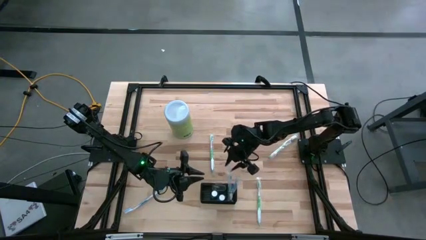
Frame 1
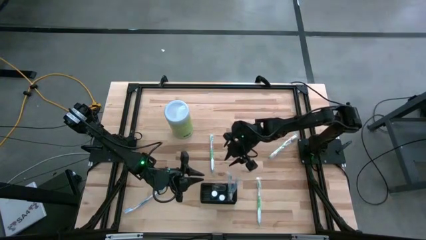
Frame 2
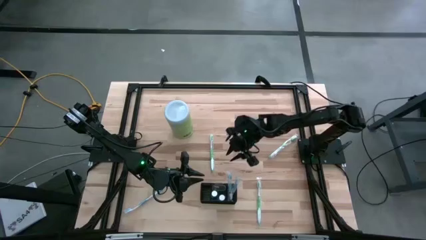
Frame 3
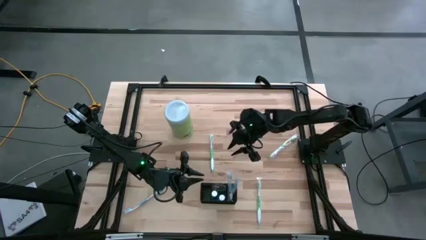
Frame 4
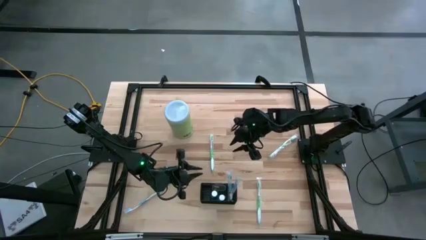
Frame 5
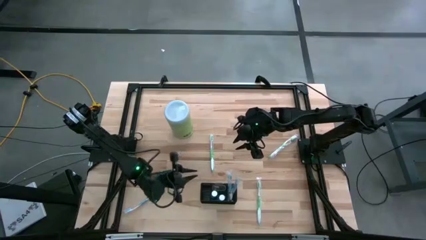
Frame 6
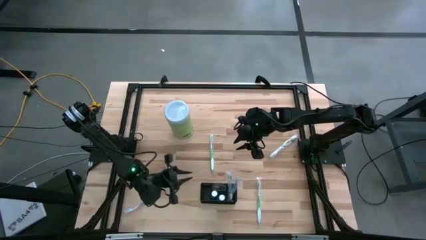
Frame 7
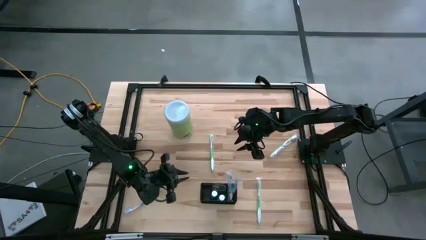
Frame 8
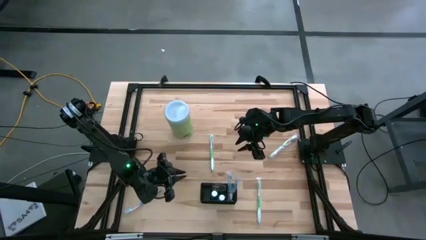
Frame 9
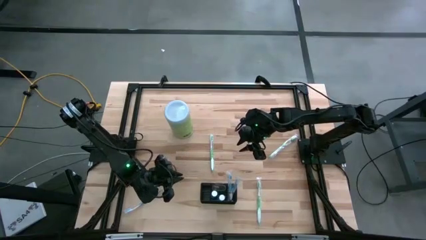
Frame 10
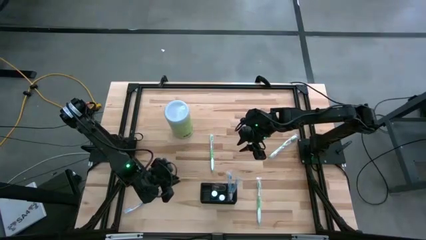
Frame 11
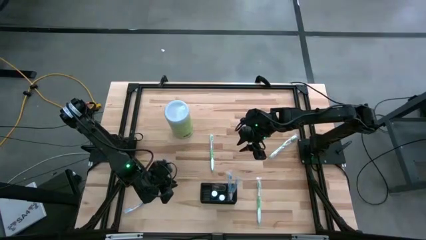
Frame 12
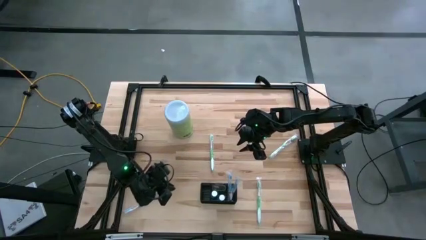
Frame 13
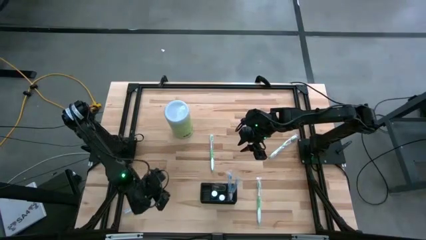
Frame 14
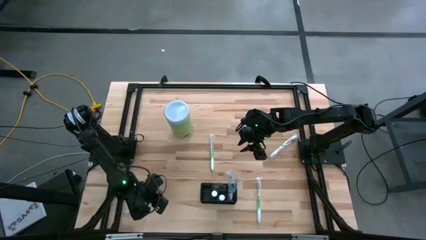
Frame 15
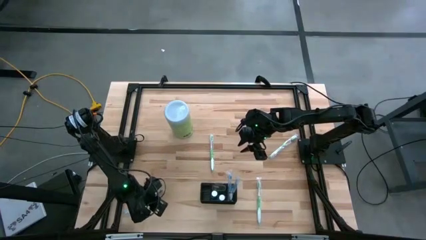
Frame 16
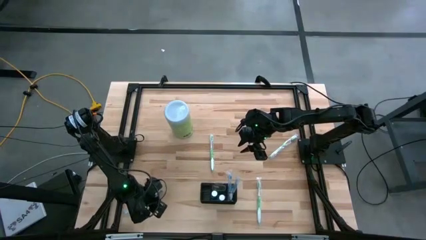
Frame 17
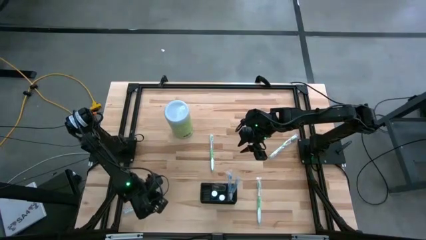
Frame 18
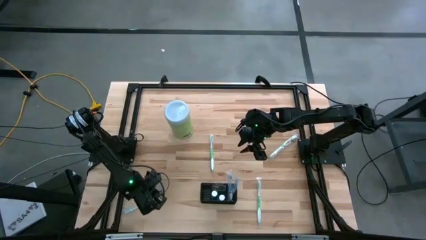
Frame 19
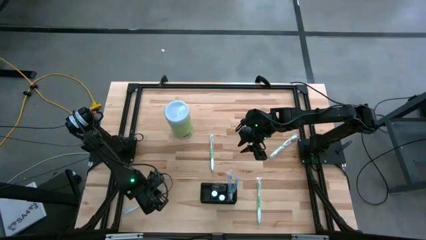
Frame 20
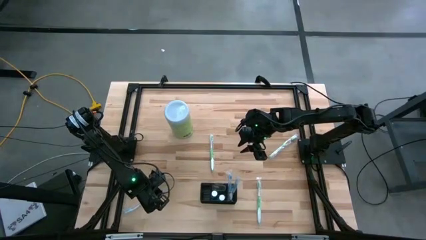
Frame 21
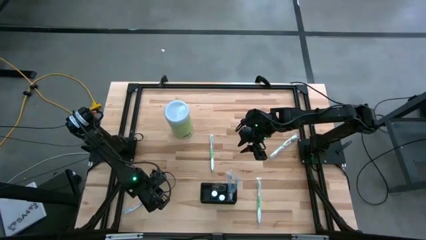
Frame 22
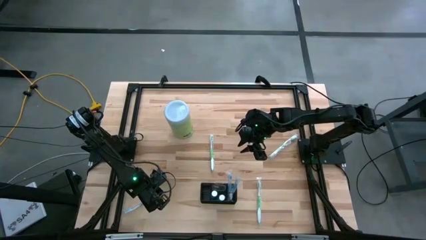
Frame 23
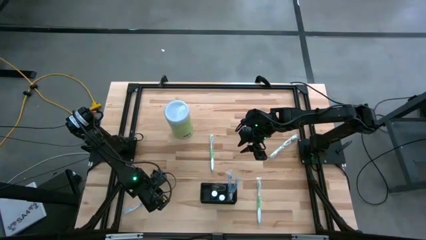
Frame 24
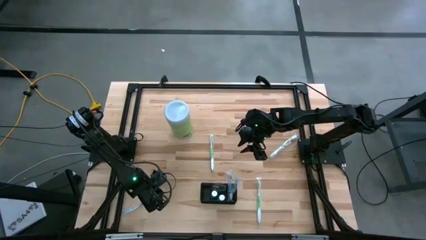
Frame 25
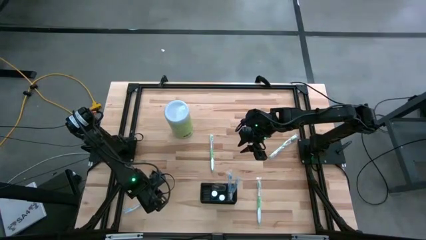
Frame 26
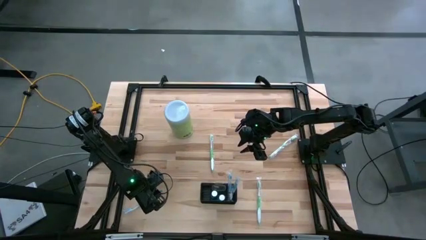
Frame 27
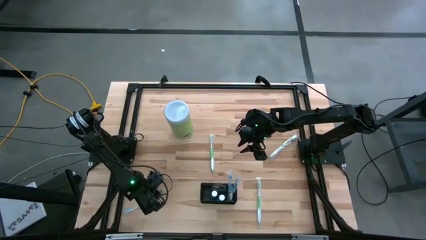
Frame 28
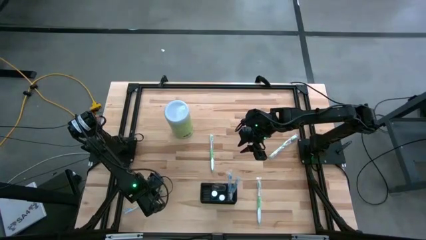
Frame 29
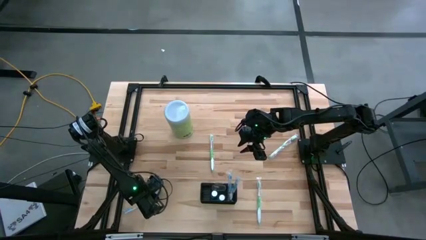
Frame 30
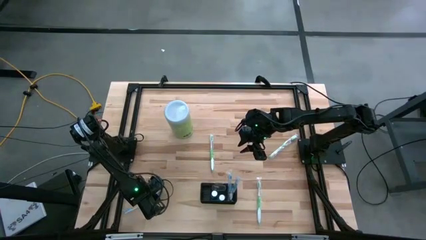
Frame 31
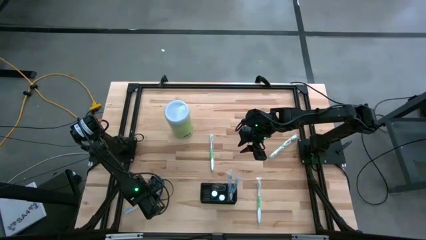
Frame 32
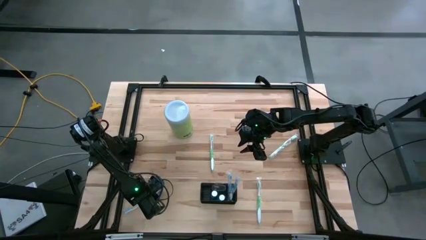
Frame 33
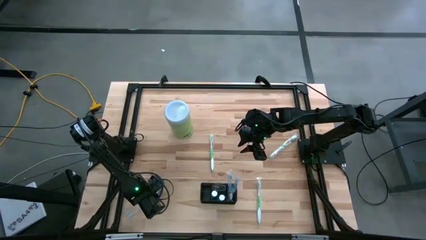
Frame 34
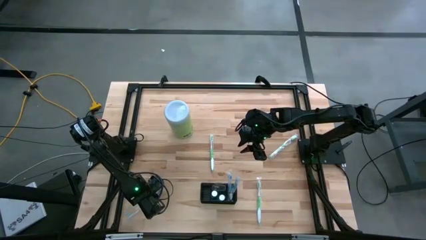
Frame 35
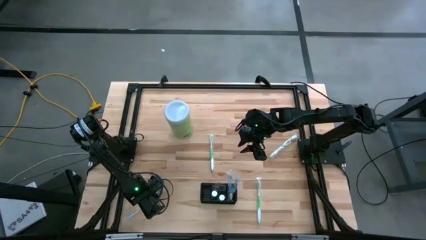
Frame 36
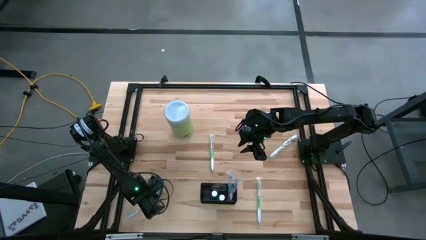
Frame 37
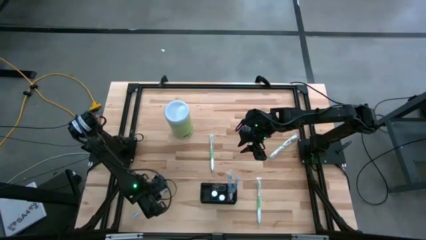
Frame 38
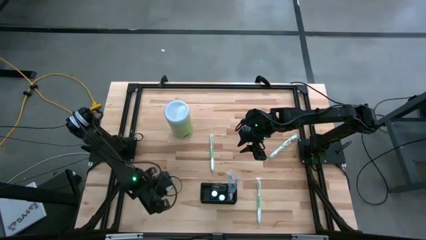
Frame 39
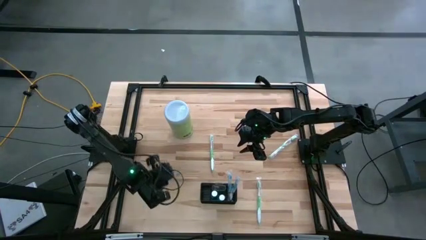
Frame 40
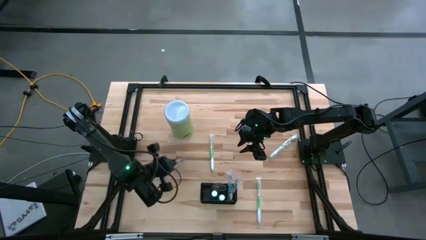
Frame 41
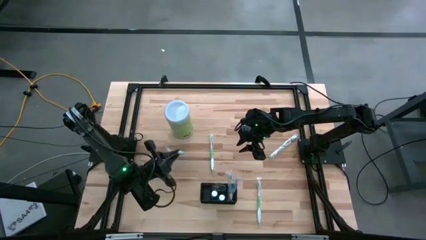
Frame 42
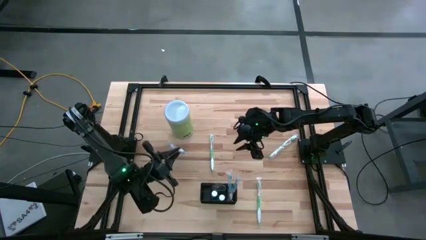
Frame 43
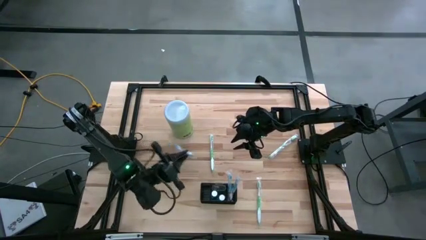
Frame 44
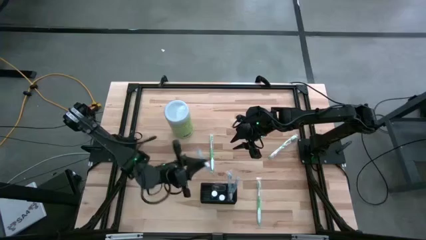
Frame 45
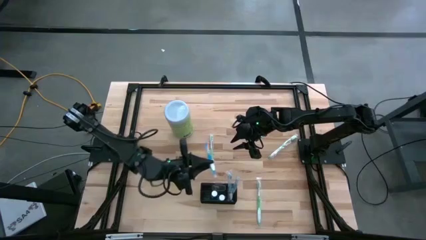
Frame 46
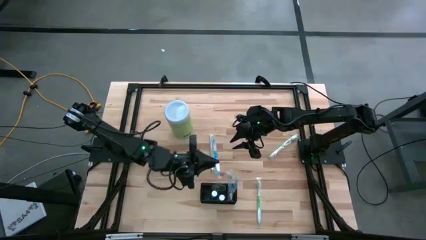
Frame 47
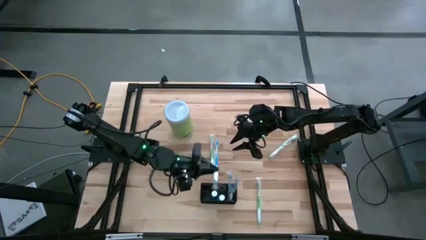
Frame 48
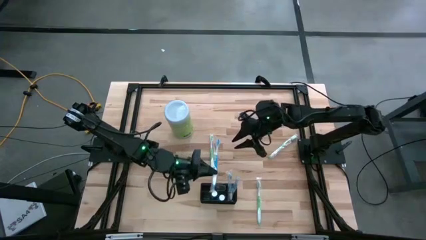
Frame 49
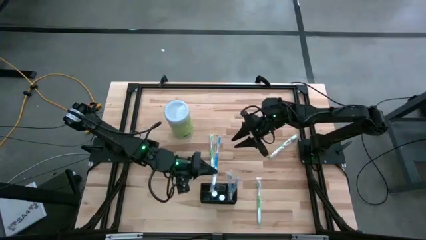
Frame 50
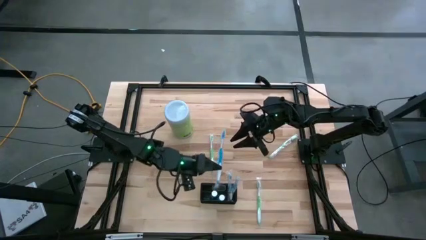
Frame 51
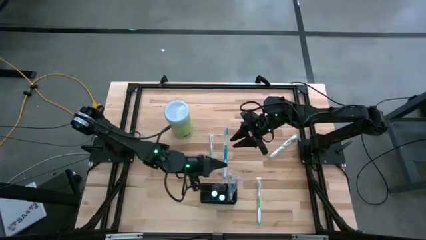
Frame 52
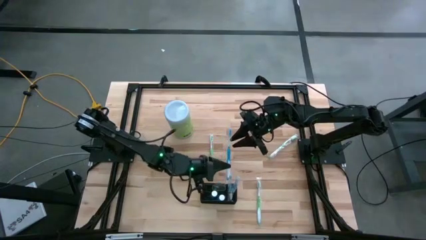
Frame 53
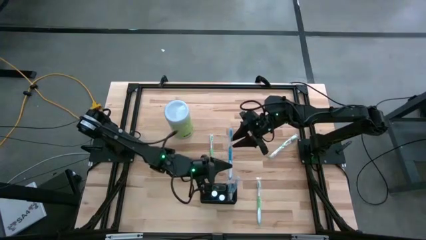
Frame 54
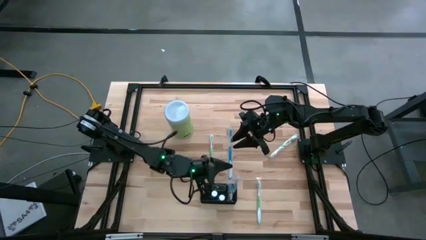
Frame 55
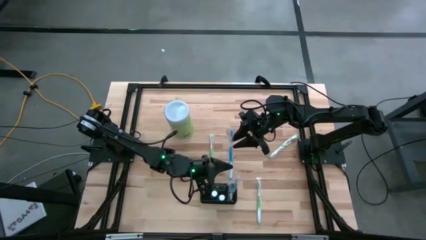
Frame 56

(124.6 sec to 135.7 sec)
Task: Pick & Place toothbrushing station
Put the blue toothbrush into the mesh organizer
